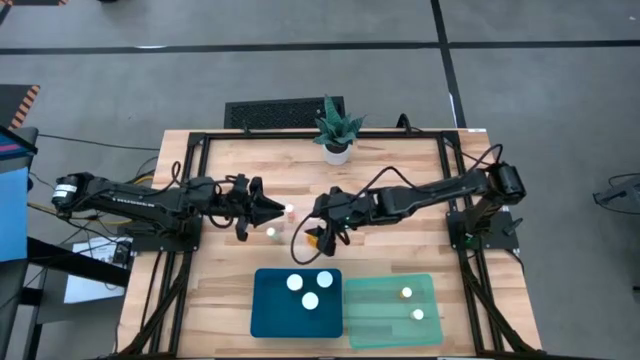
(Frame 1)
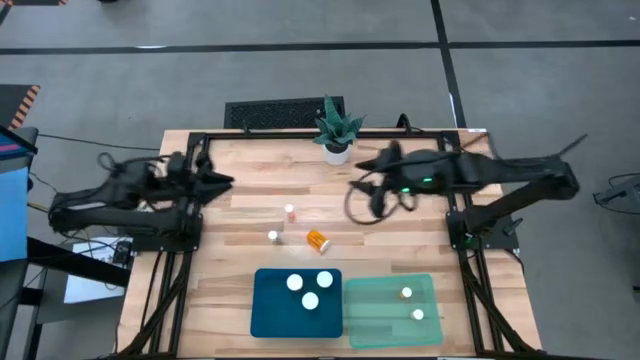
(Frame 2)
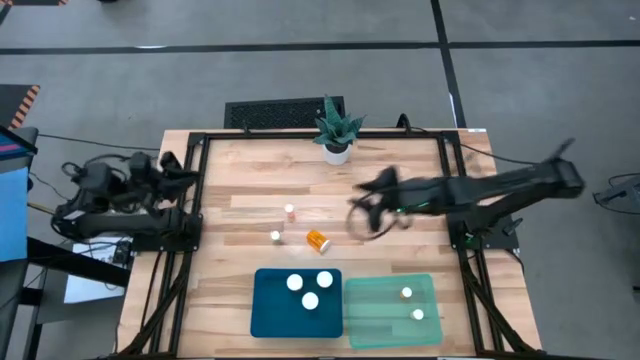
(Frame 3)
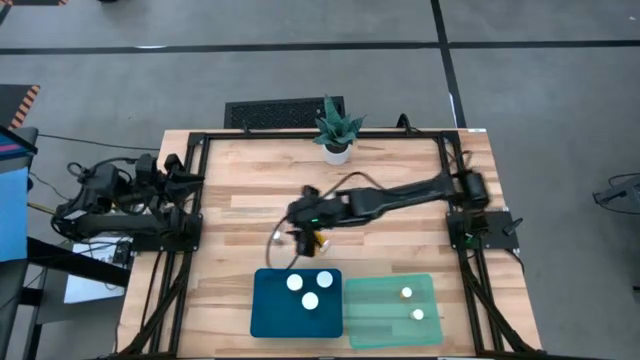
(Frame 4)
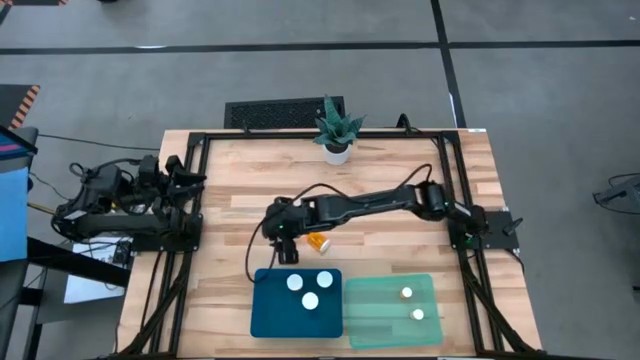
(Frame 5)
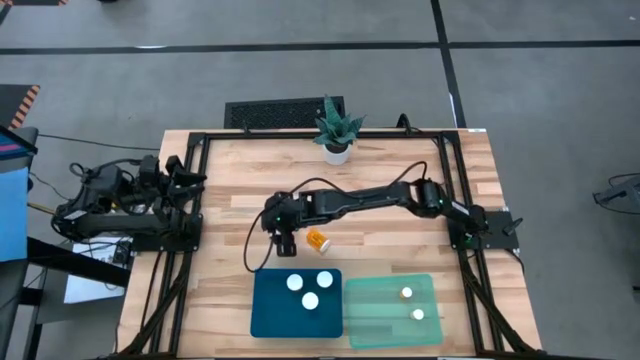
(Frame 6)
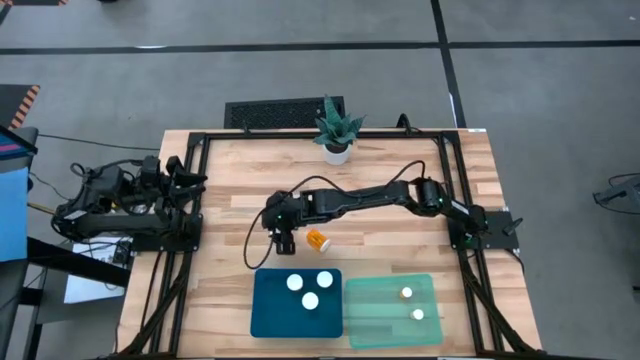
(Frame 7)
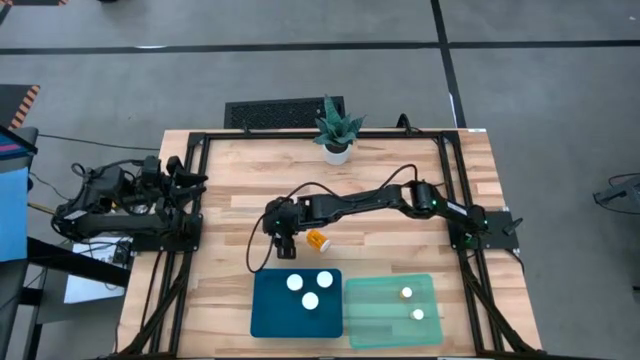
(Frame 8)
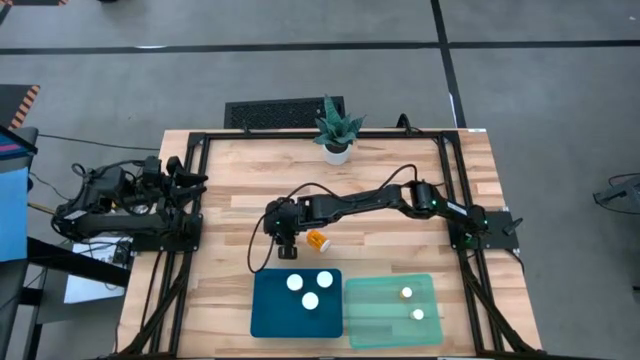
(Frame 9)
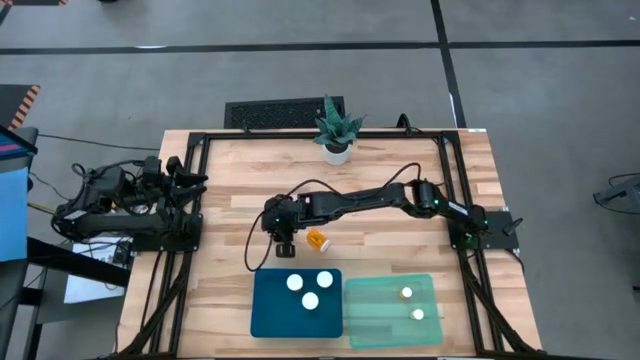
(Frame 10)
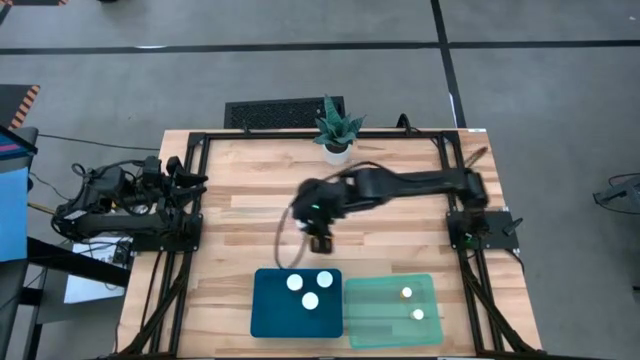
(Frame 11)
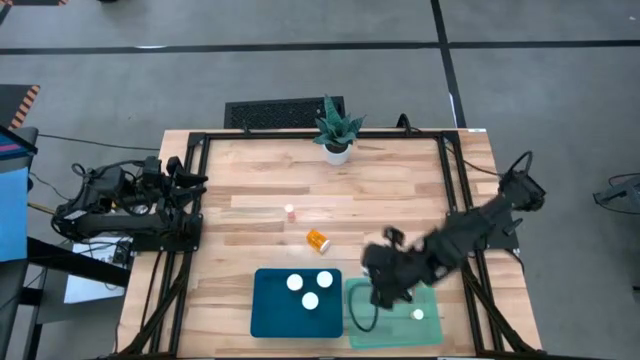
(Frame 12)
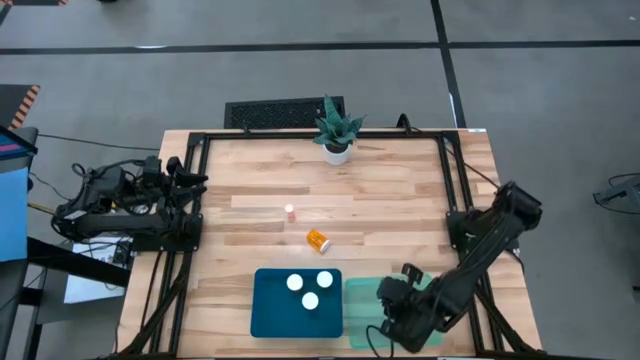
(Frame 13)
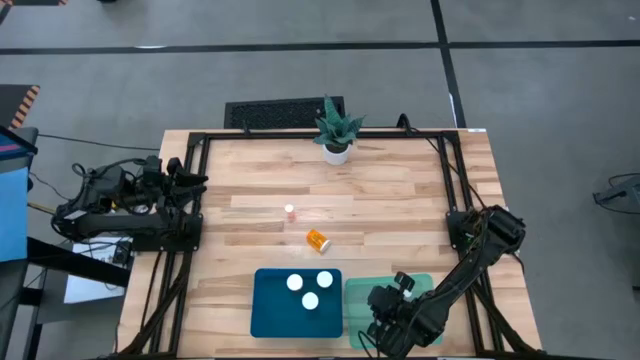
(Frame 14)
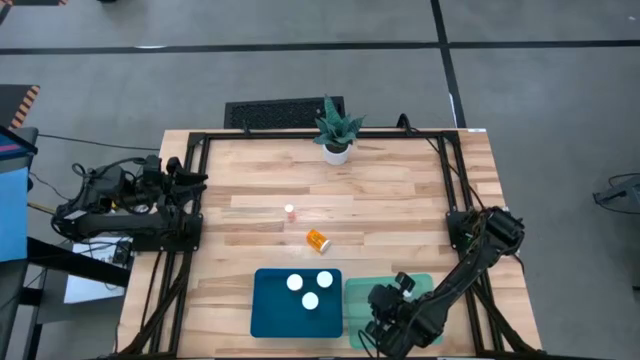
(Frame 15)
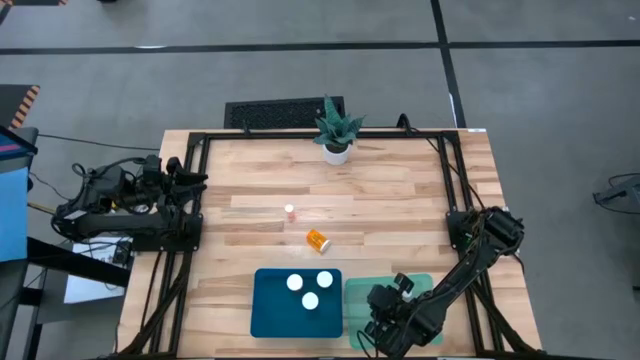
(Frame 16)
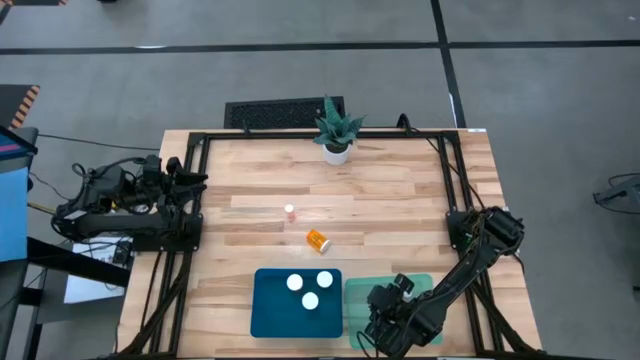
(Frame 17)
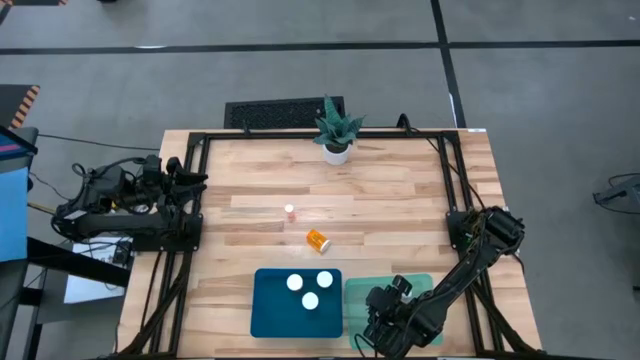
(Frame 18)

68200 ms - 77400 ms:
Task: Pick and place medicine bottles into bin by pill shape (circle, oval)
Put the small blue pill bottle into the light blue bin

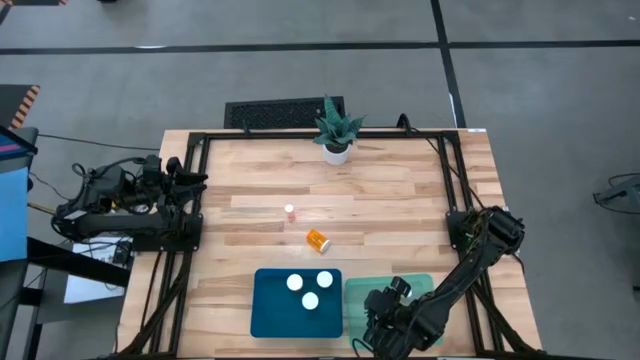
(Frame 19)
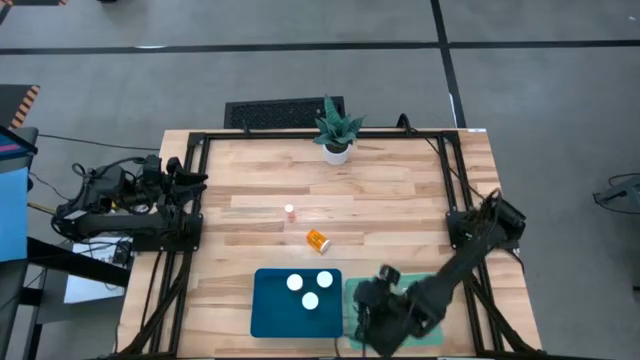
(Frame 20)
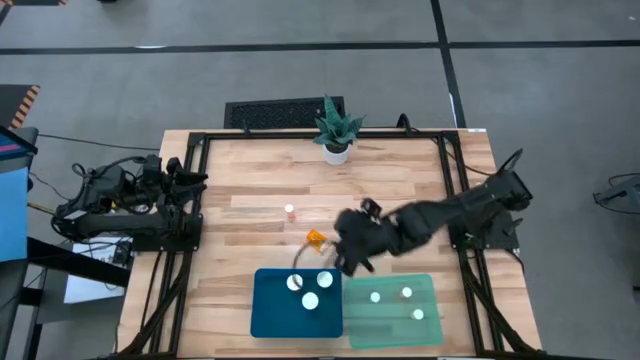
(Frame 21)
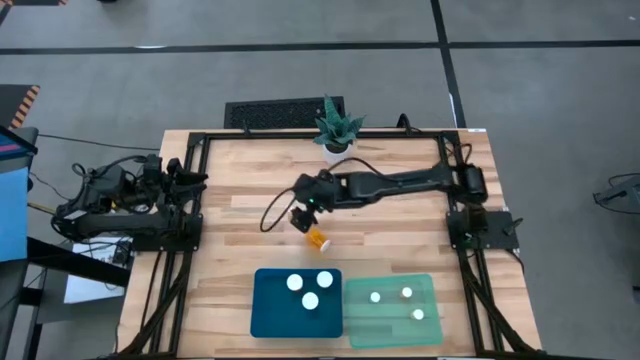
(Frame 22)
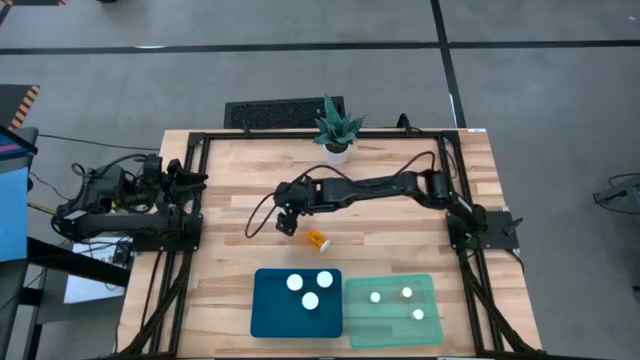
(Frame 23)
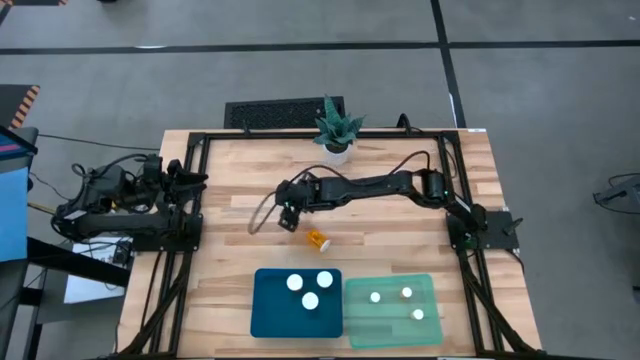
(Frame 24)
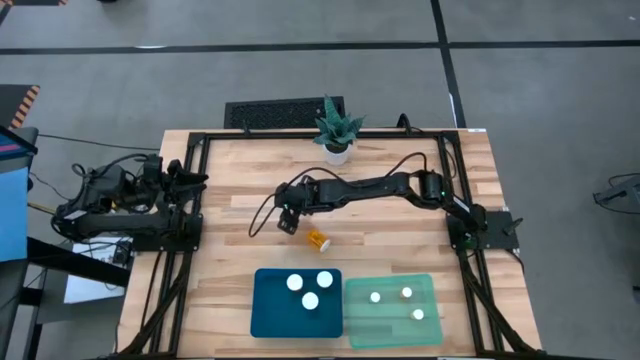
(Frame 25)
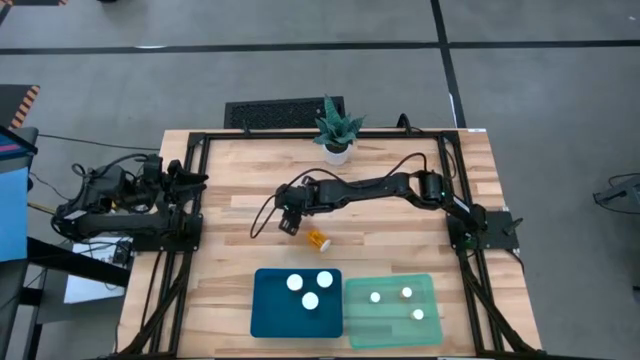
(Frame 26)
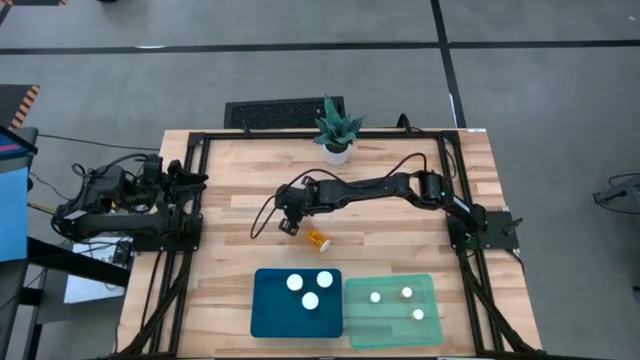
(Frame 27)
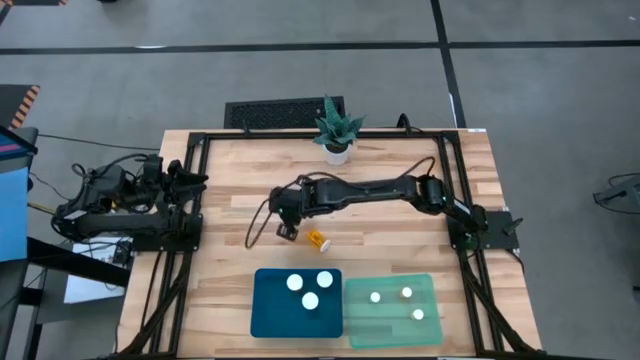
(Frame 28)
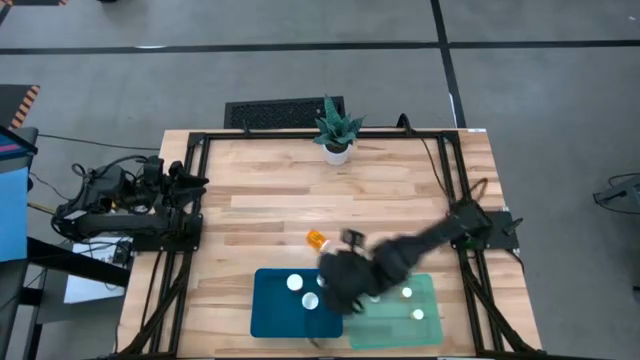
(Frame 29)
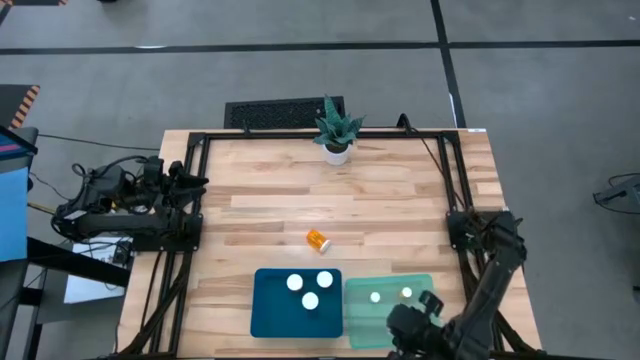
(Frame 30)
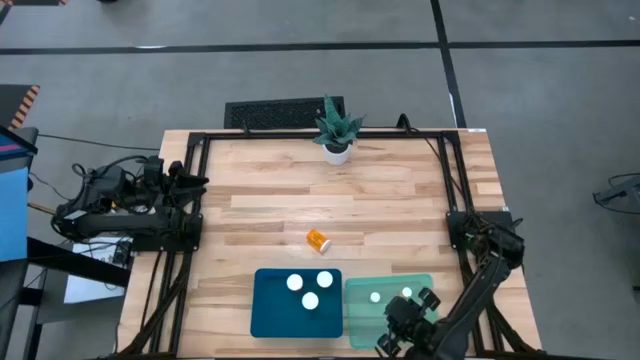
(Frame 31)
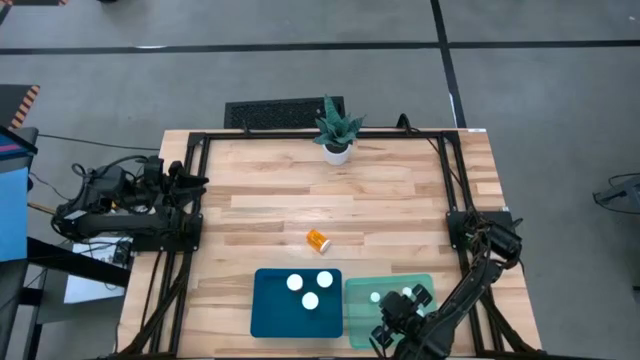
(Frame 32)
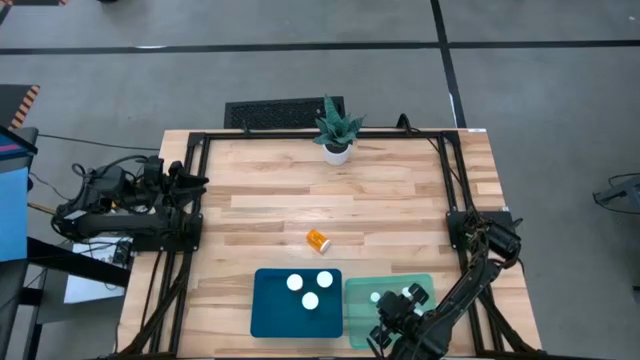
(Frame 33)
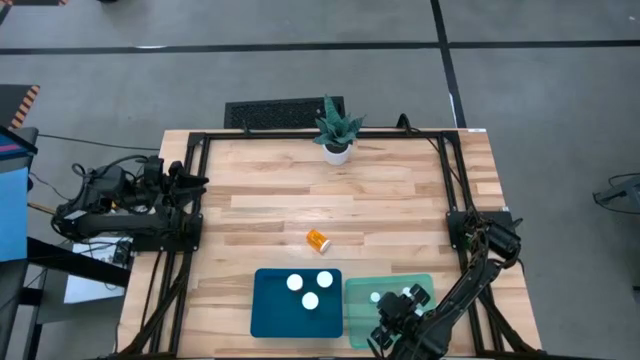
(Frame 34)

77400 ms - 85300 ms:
Put the small pink pill bottle into the light blue bin

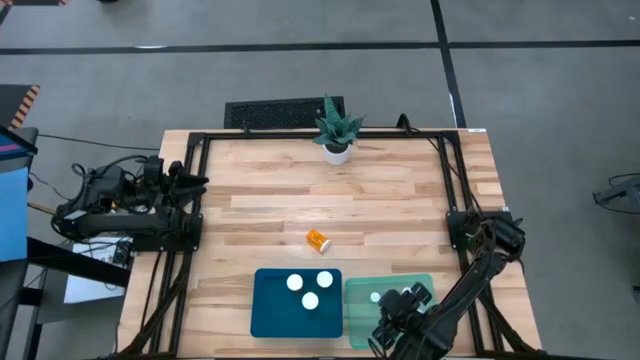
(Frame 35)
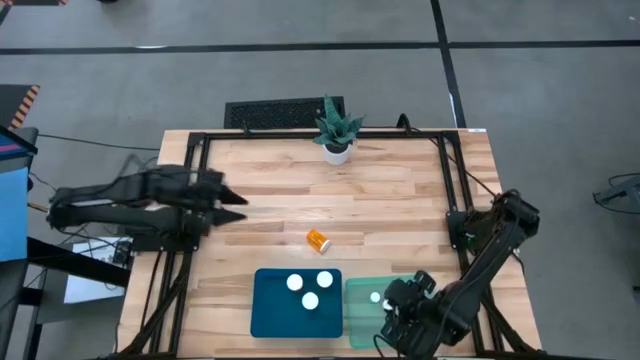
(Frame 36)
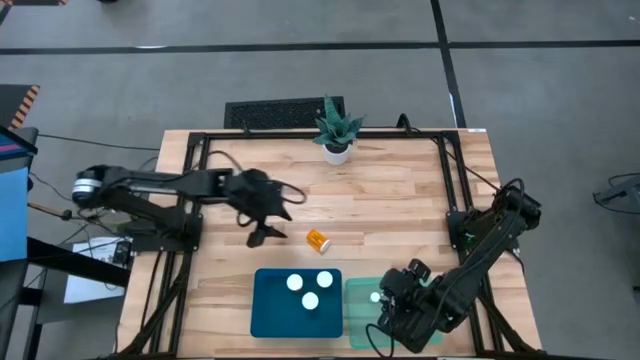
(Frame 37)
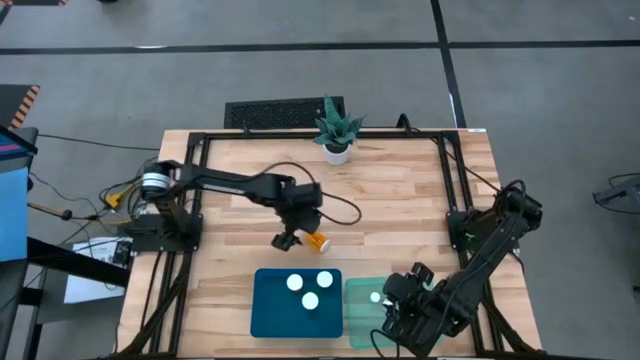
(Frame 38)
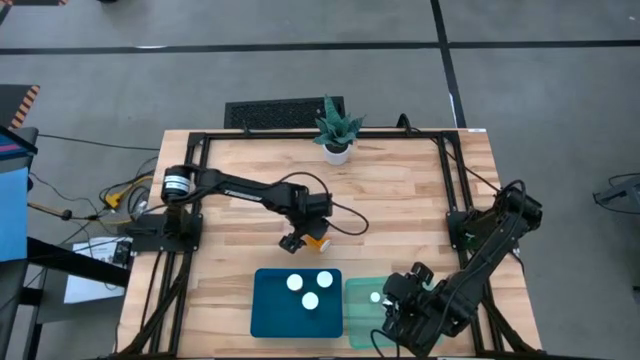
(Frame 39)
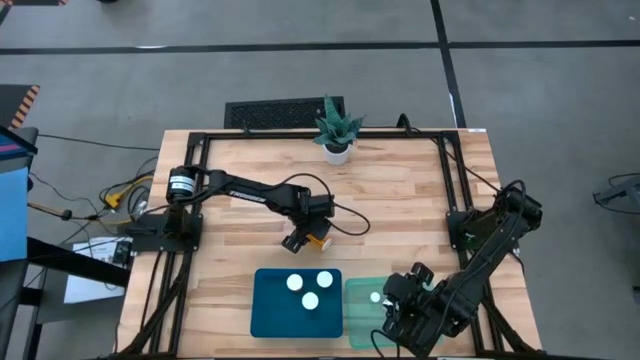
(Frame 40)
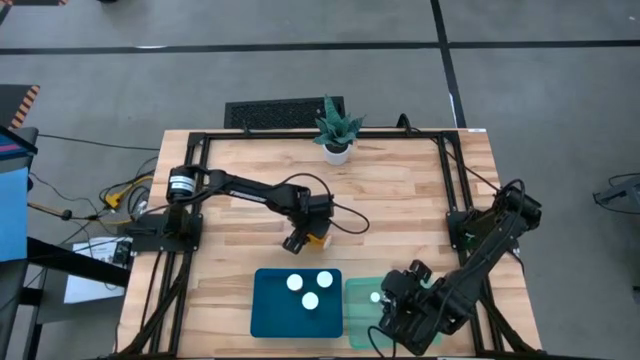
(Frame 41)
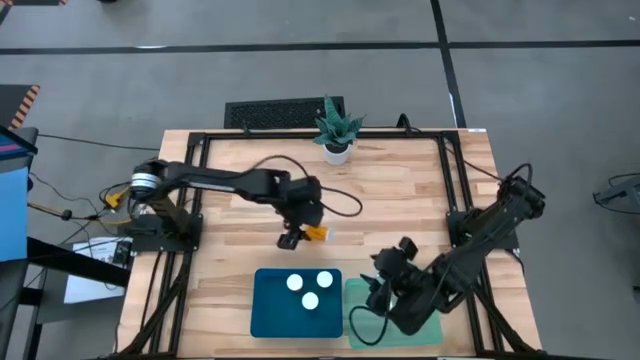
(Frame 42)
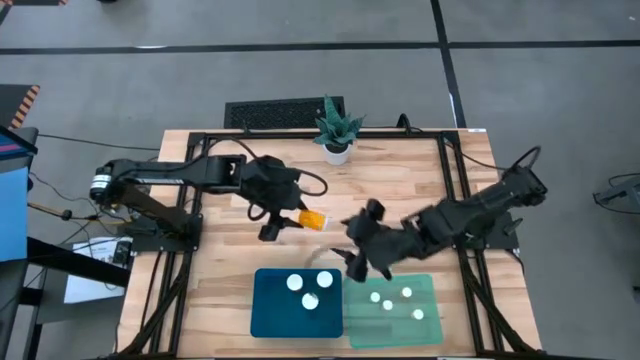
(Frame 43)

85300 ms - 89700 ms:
Put the large orange pill bottle into the blue bin

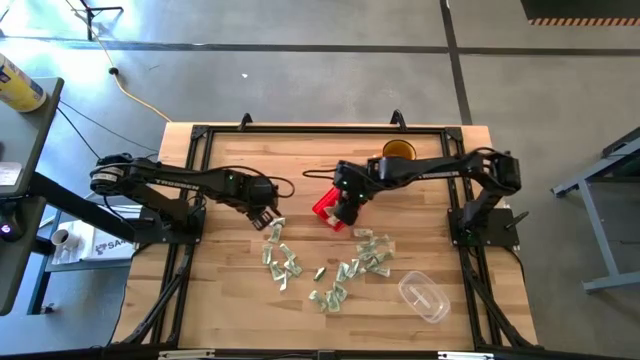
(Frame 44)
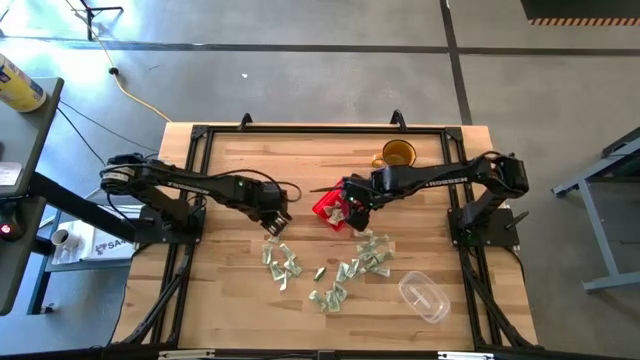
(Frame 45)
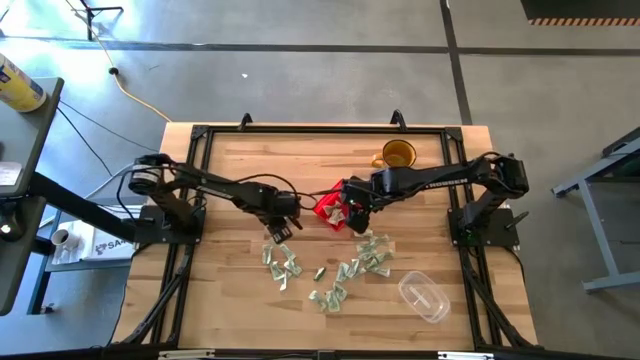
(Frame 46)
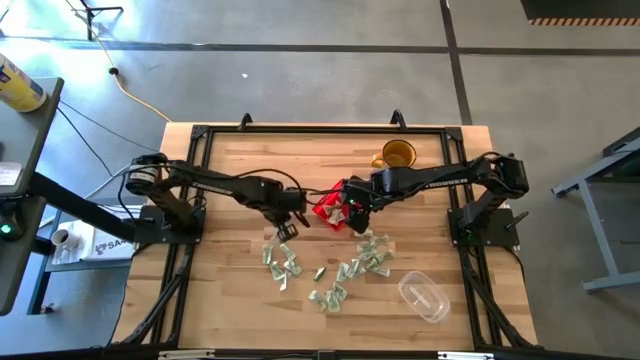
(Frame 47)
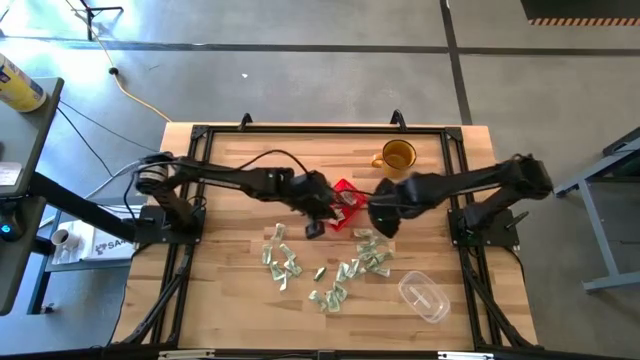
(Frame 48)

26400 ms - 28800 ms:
Task: Pick and place items into bin
Put the white stevia packet into the red bin
